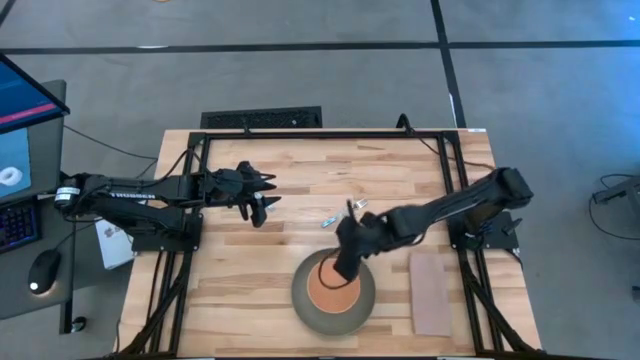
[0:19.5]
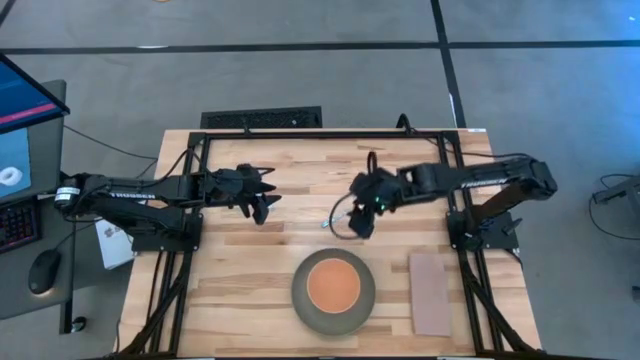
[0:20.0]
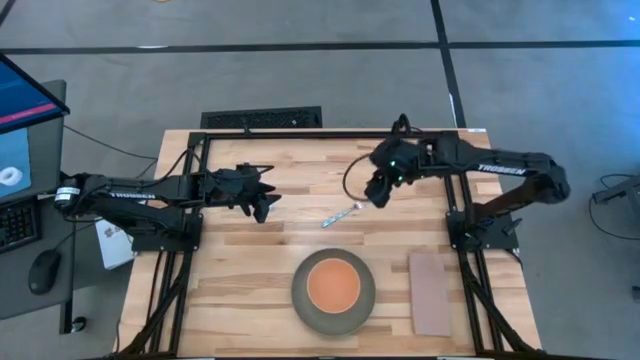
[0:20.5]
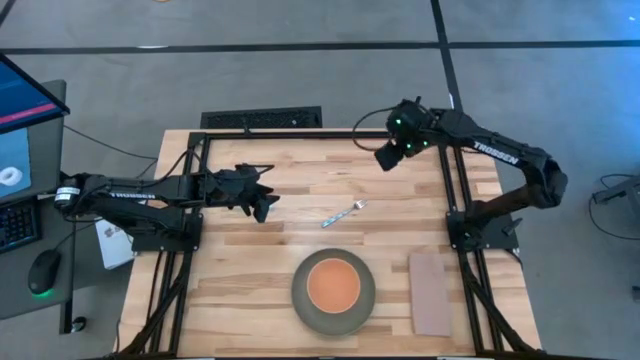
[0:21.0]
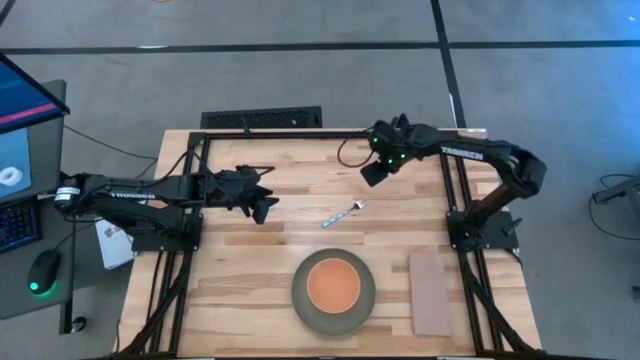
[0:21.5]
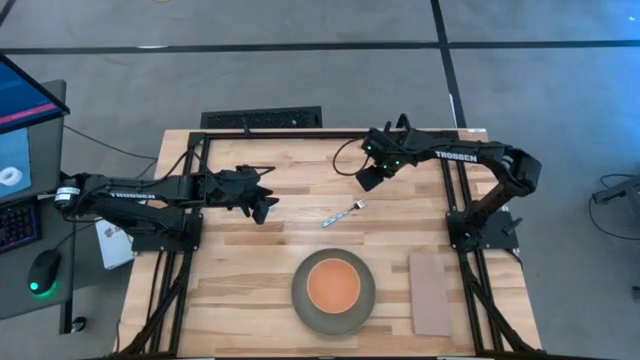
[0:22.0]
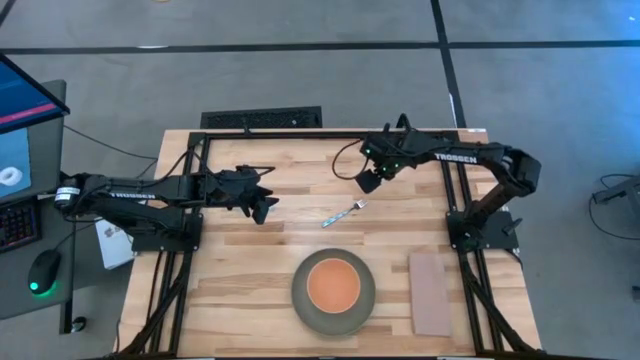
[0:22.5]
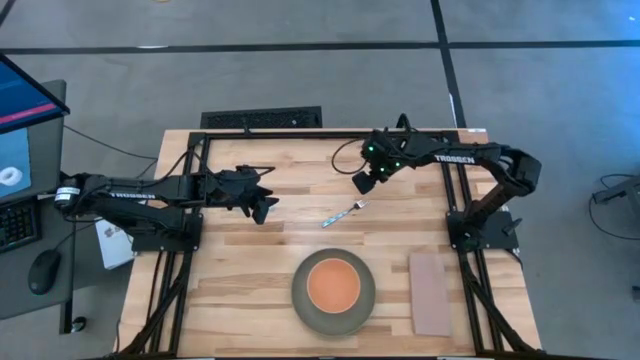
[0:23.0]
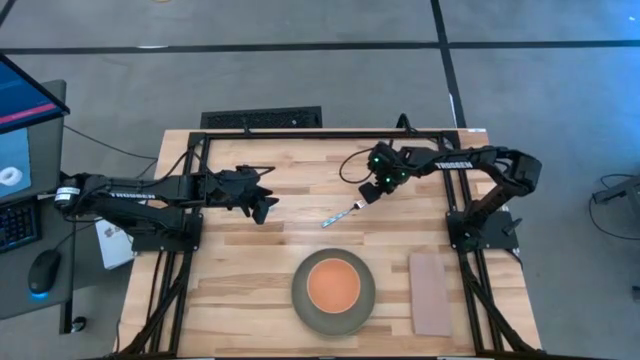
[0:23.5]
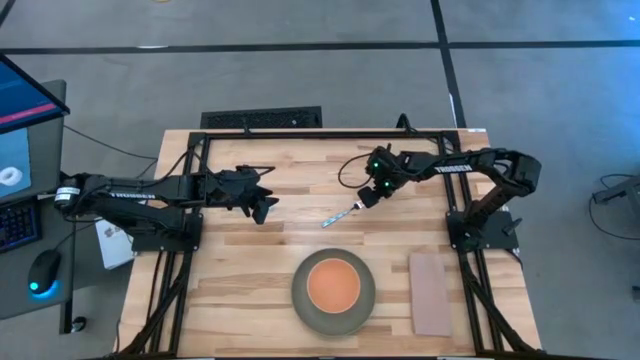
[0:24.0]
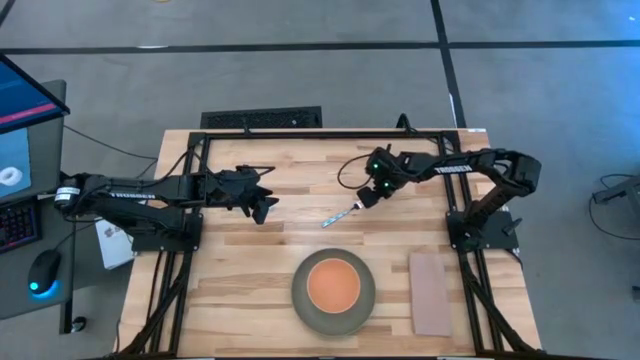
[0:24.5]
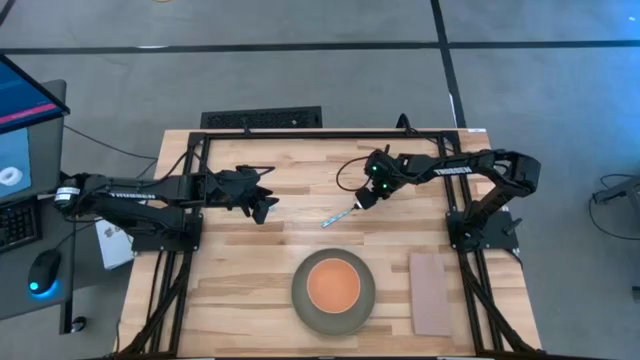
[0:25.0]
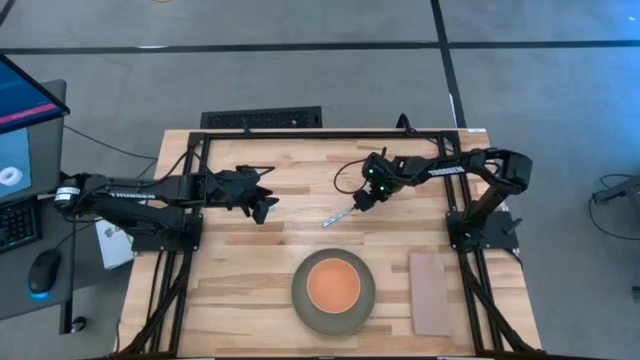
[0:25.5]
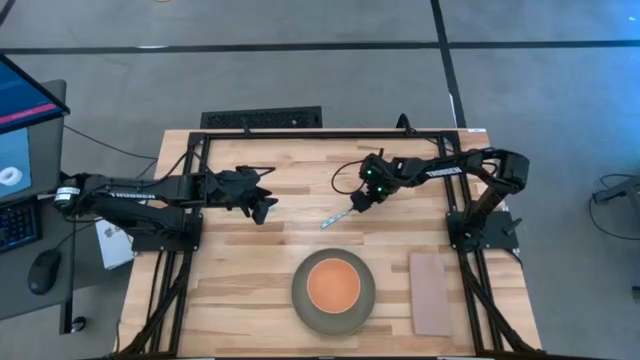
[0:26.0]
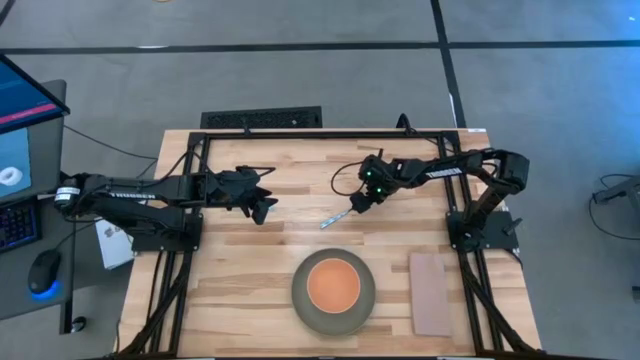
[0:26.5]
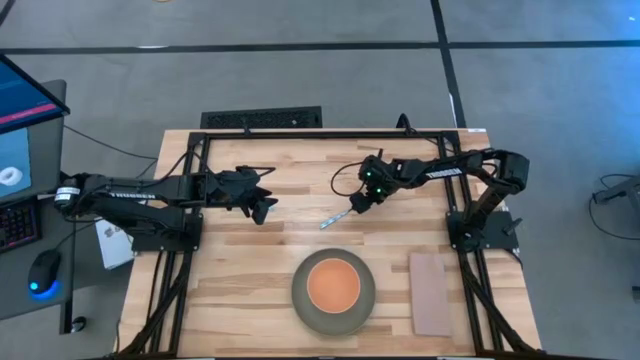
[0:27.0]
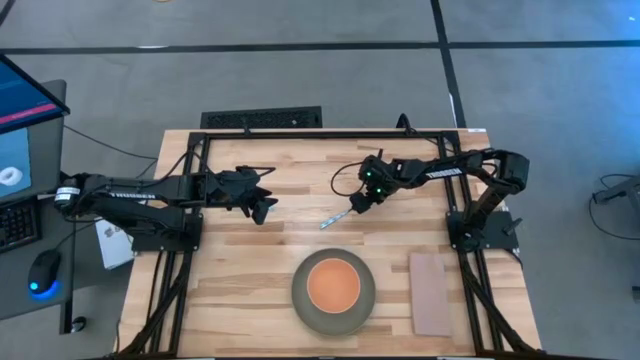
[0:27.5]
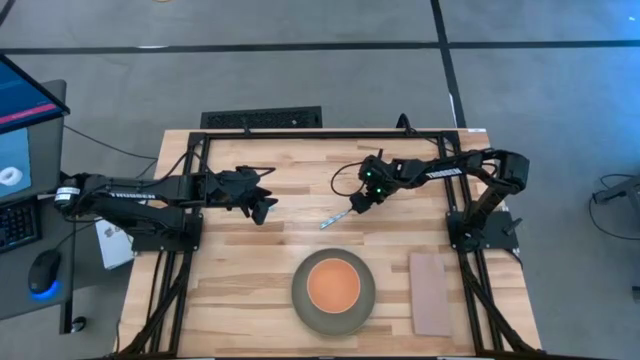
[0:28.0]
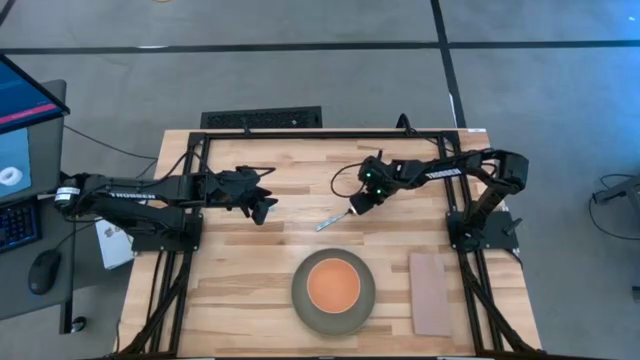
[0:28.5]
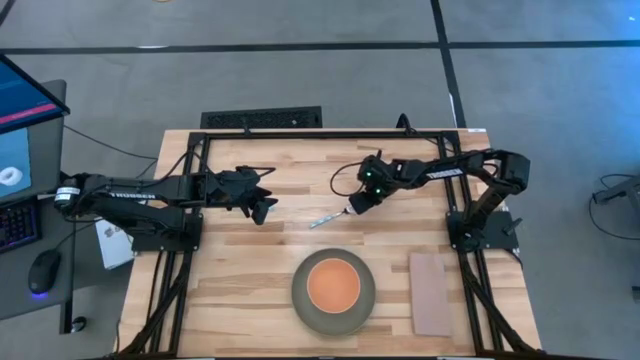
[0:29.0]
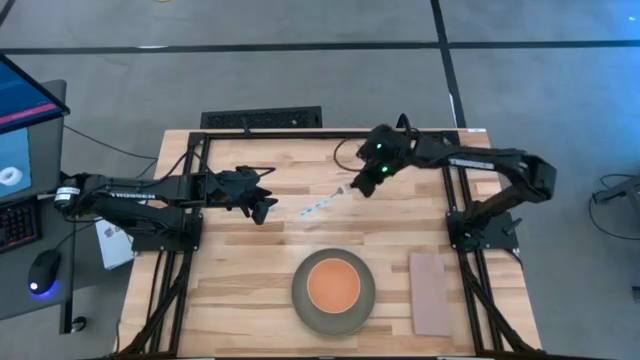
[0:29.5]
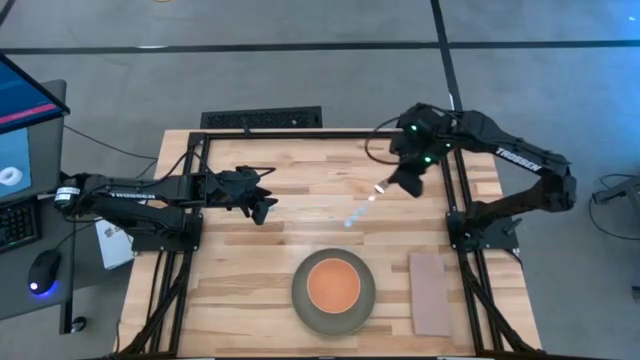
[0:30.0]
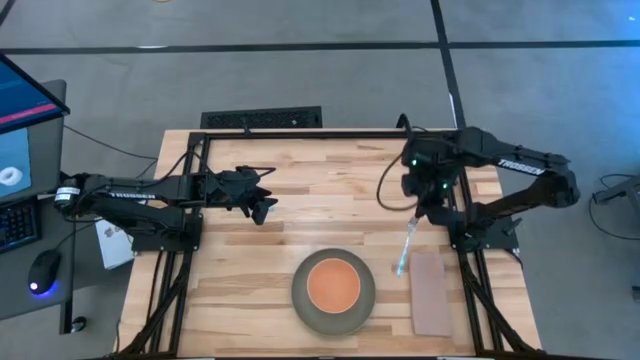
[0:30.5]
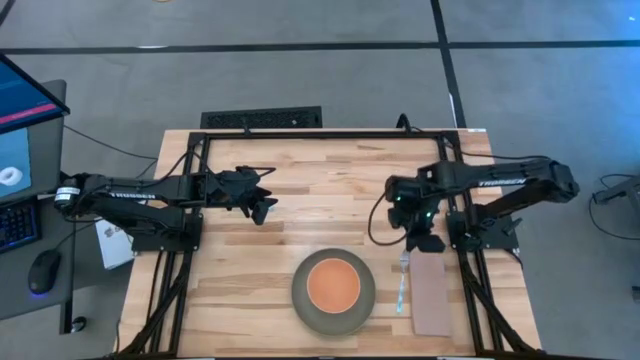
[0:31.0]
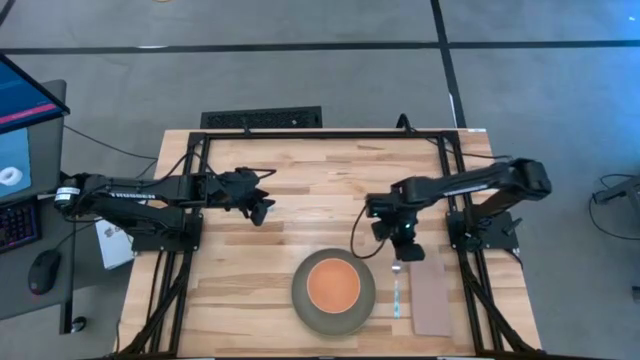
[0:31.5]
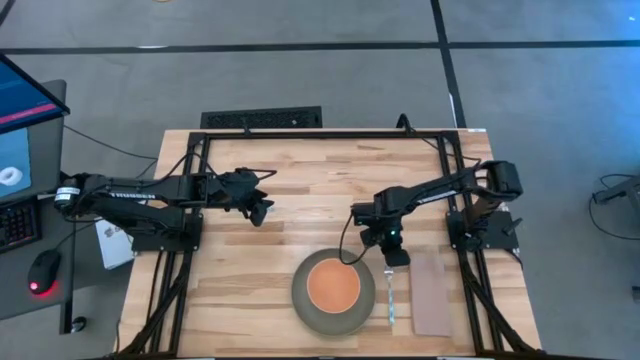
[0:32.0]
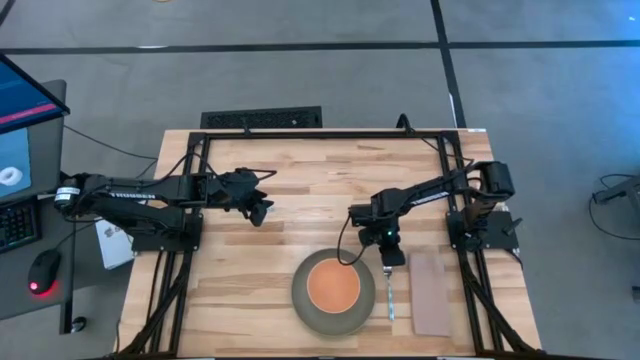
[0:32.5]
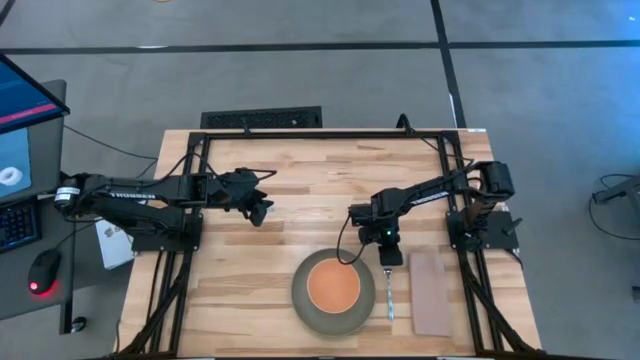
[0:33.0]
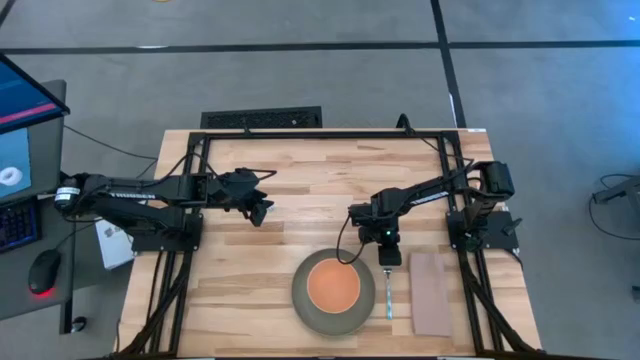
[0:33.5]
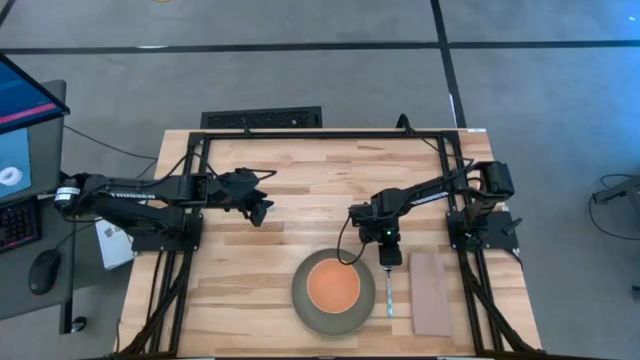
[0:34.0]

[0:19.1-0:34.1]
Task: Set table place
Put the blue fork on the right of the gray plate on the table

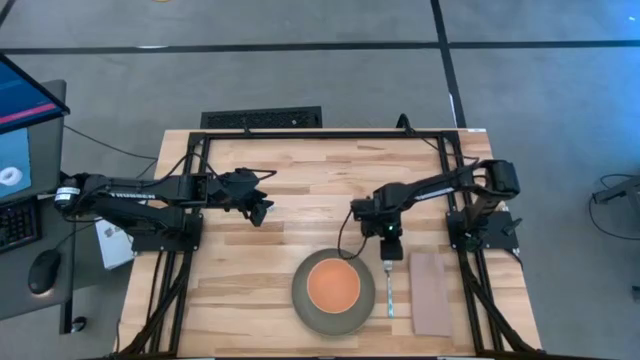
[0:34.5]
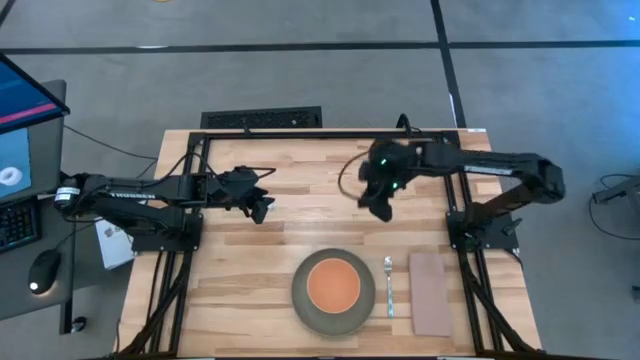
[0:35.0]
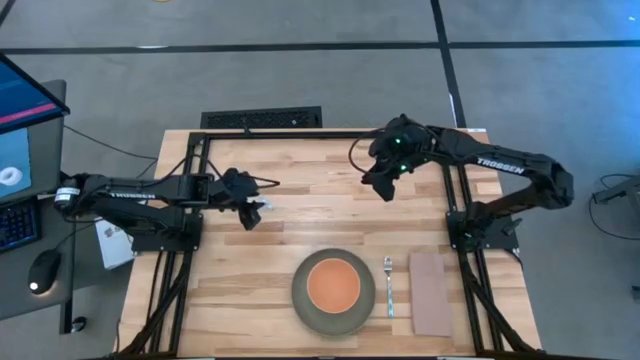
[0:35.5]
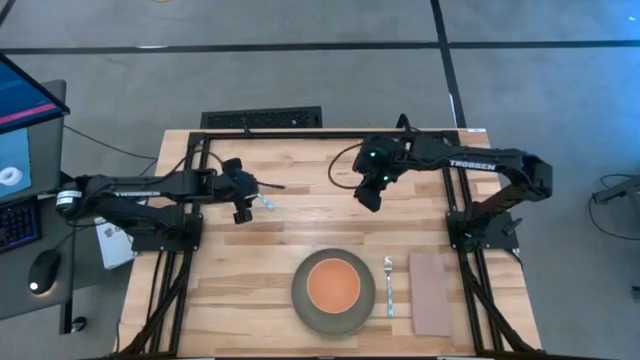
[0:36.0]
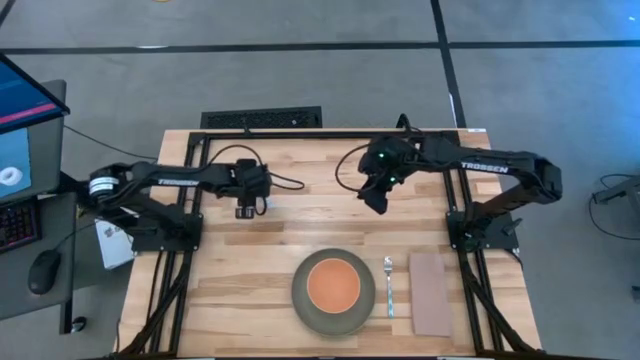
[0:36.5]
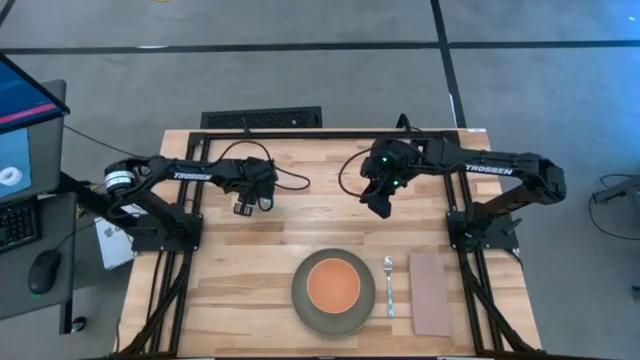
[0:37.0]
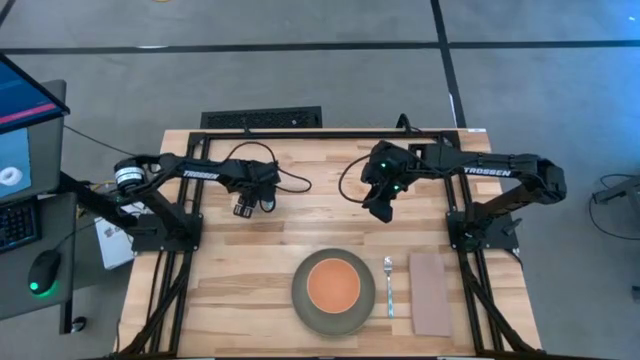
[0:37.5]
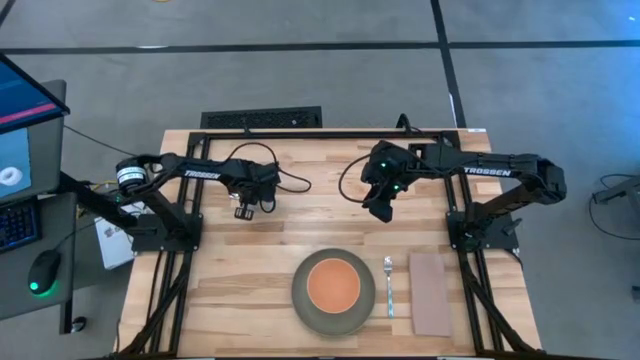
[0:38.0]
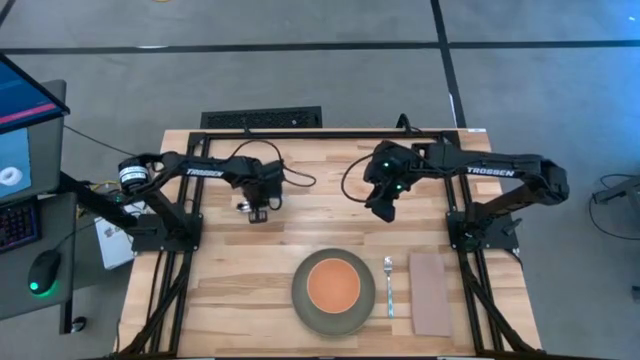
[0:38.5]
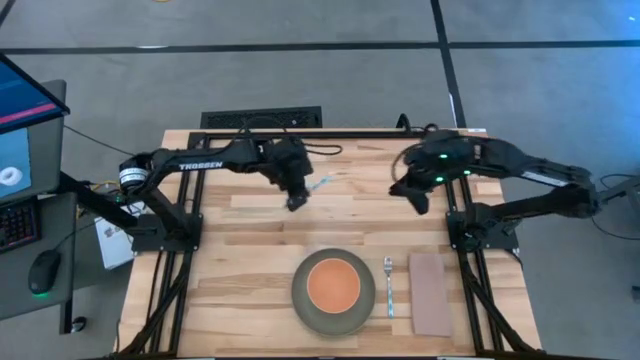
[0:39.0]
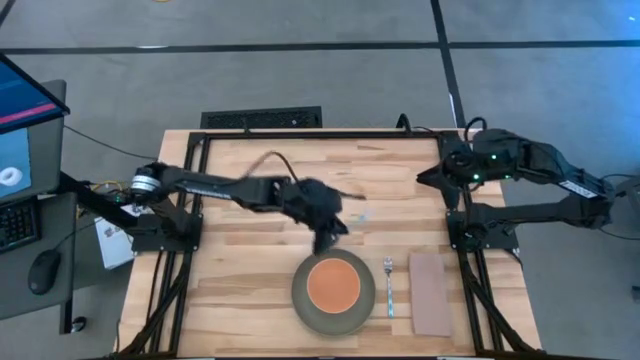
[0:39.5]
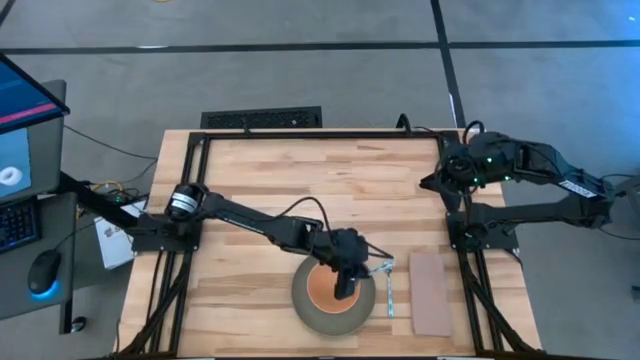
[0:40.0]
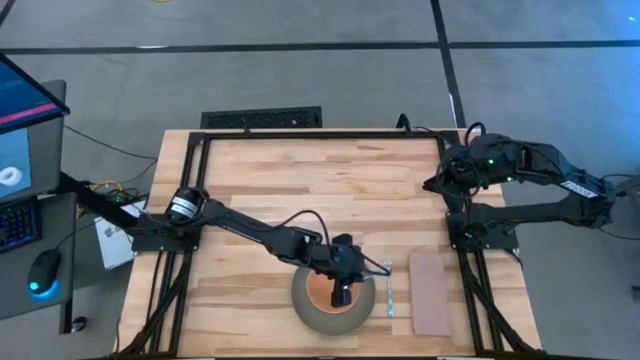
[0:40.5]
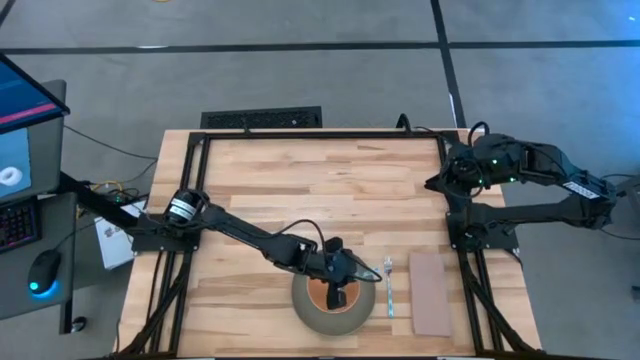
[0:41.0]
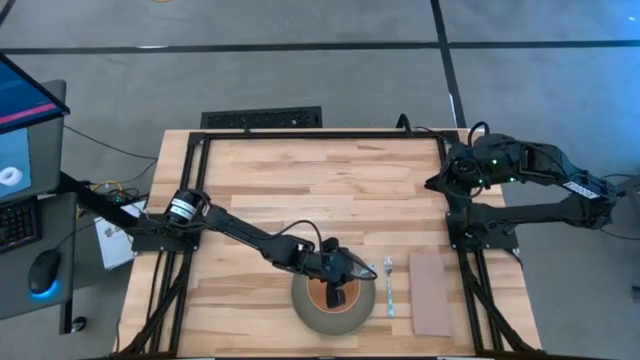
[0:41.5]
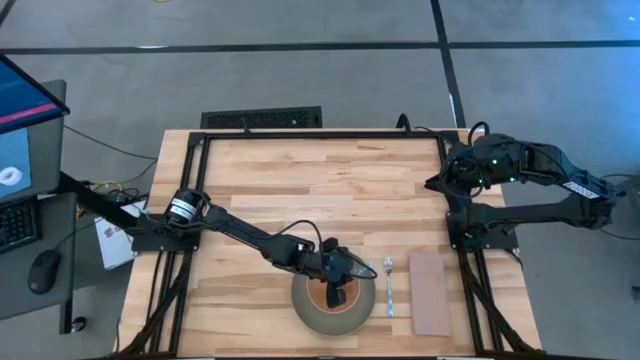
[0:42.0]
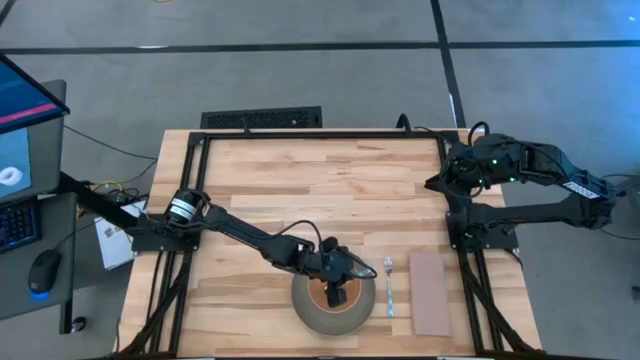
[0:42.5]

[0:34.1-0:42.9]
Put the blue spoon on top of the brown bowl
